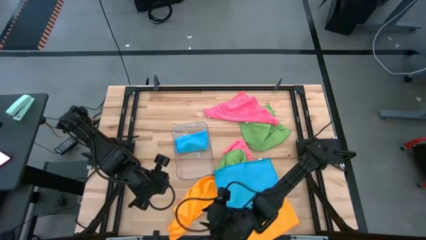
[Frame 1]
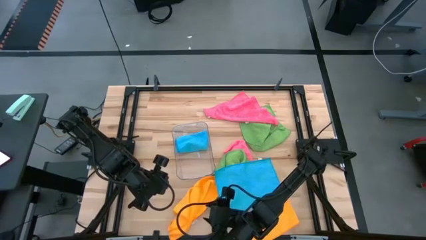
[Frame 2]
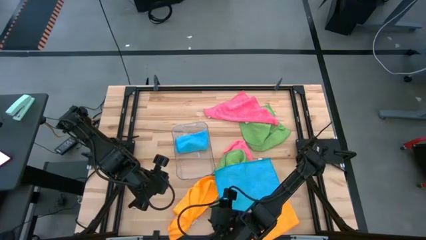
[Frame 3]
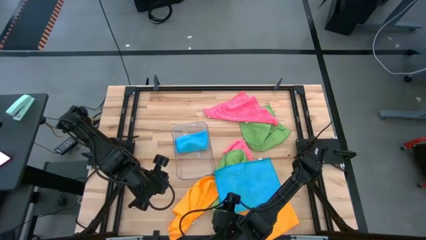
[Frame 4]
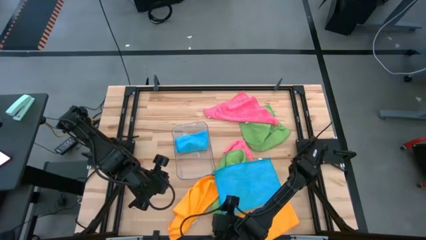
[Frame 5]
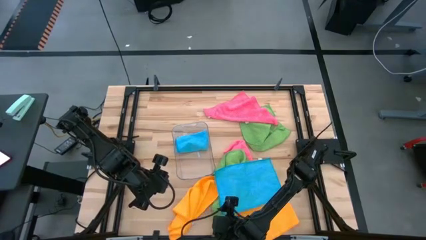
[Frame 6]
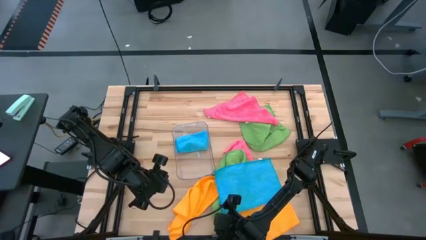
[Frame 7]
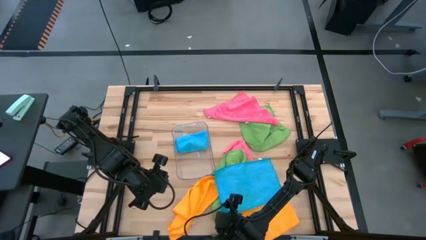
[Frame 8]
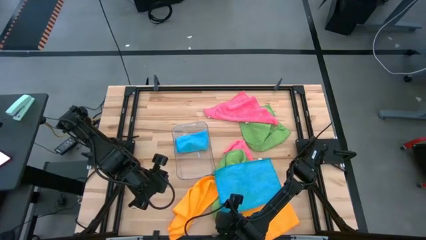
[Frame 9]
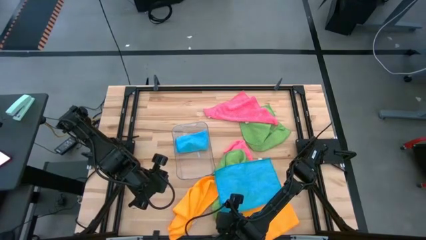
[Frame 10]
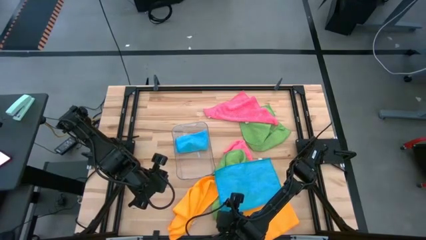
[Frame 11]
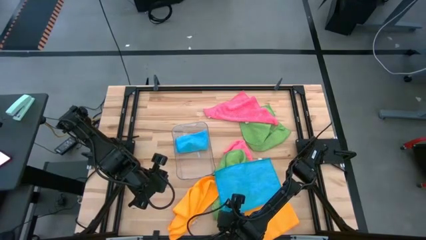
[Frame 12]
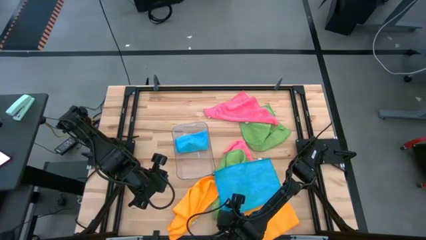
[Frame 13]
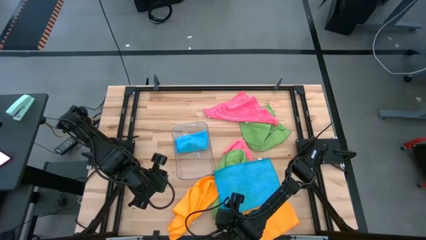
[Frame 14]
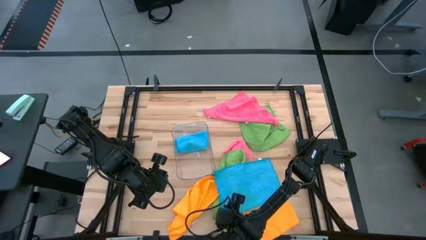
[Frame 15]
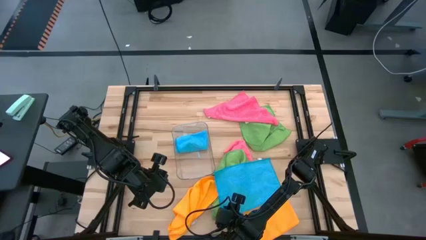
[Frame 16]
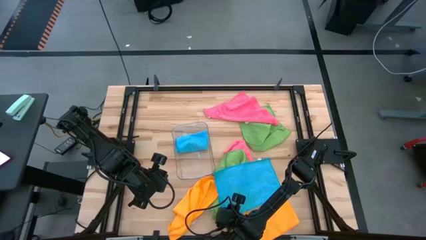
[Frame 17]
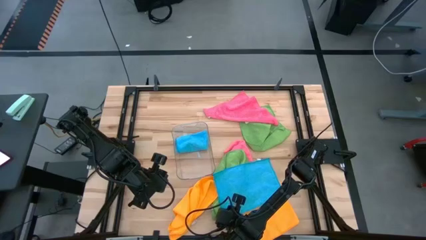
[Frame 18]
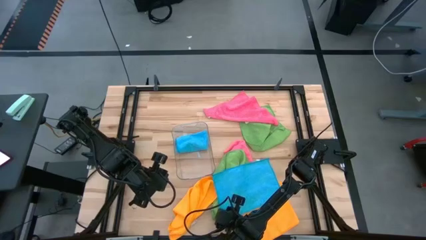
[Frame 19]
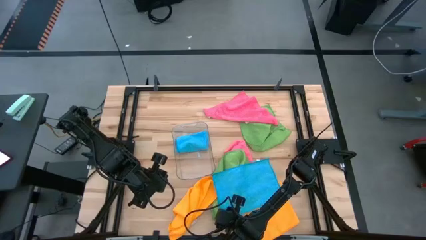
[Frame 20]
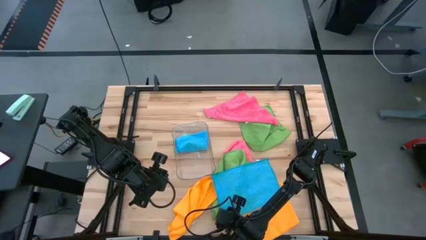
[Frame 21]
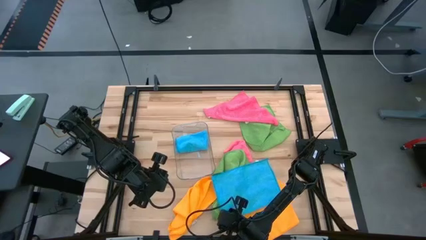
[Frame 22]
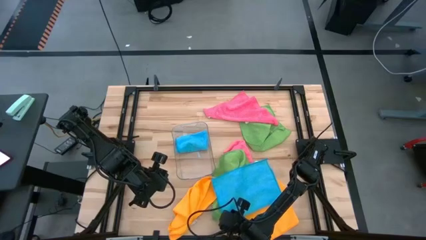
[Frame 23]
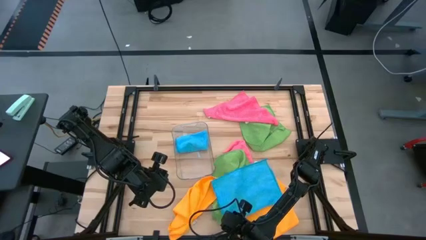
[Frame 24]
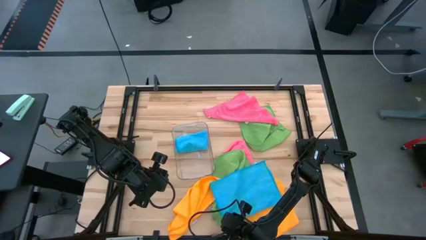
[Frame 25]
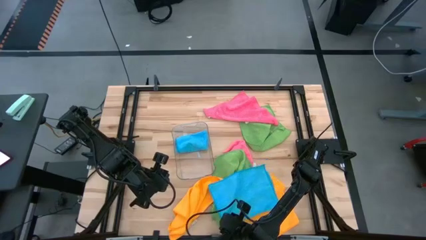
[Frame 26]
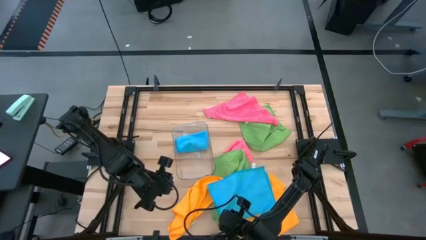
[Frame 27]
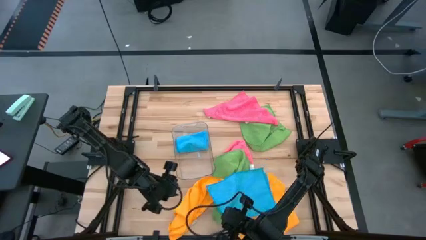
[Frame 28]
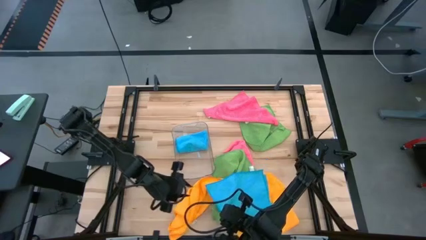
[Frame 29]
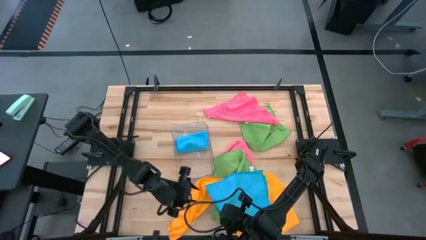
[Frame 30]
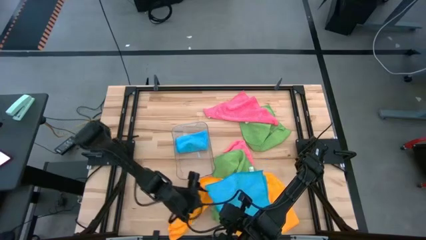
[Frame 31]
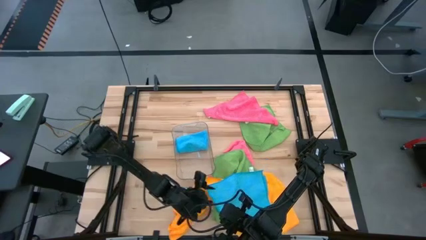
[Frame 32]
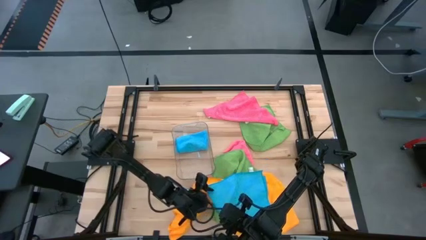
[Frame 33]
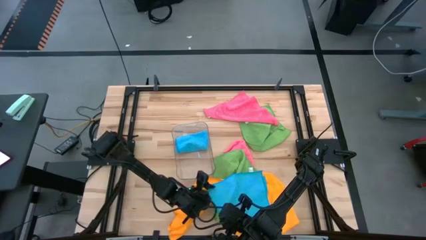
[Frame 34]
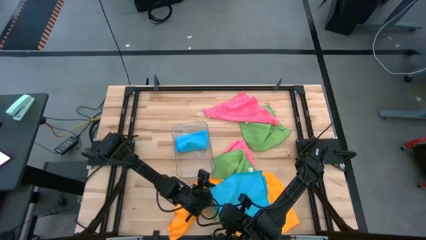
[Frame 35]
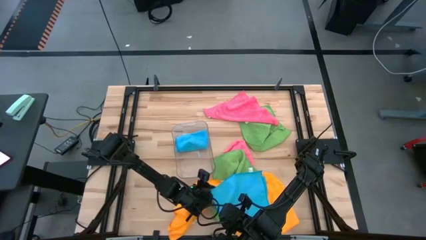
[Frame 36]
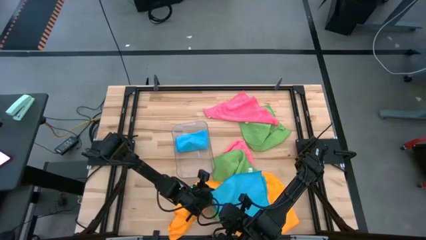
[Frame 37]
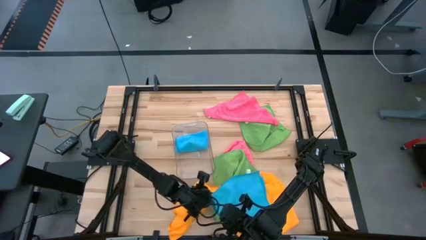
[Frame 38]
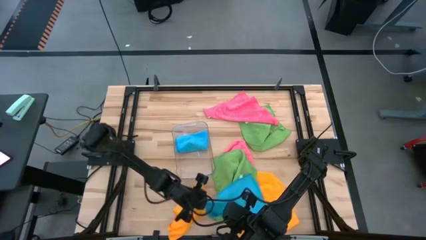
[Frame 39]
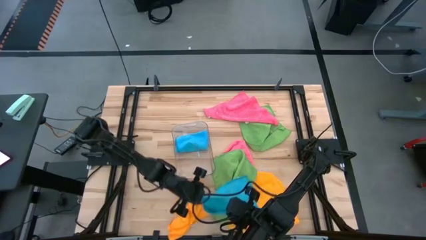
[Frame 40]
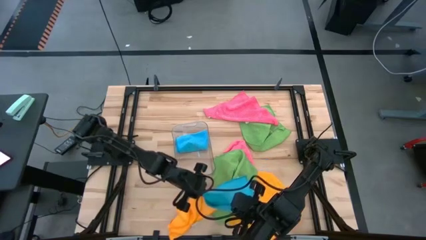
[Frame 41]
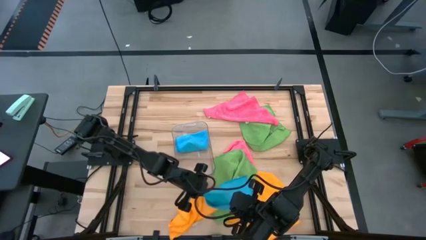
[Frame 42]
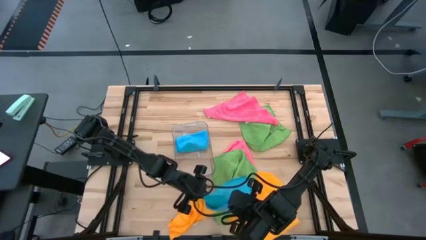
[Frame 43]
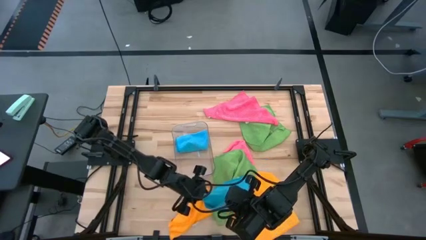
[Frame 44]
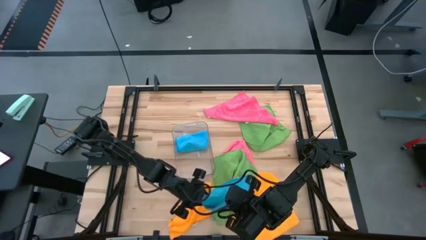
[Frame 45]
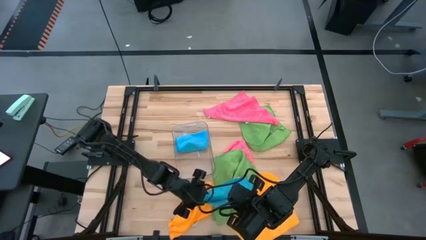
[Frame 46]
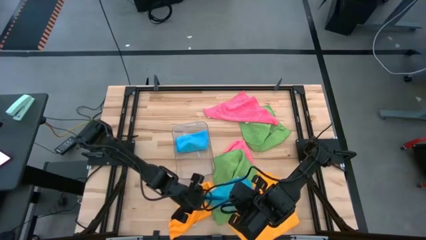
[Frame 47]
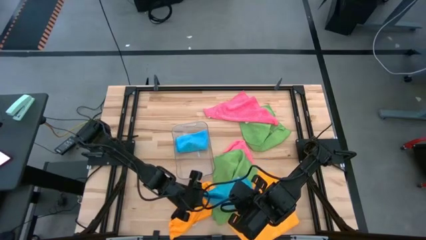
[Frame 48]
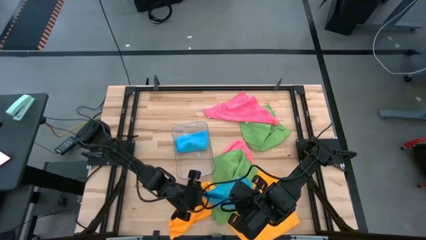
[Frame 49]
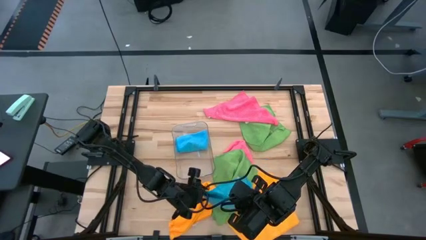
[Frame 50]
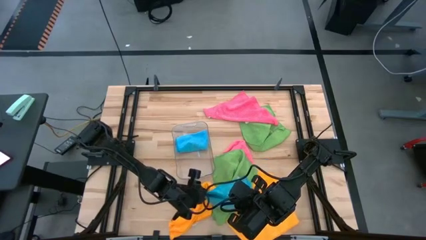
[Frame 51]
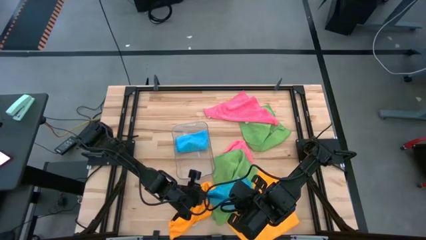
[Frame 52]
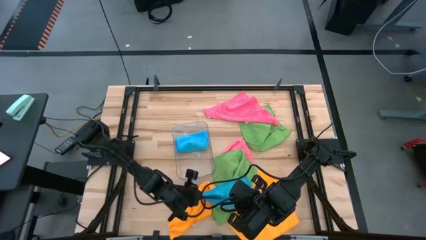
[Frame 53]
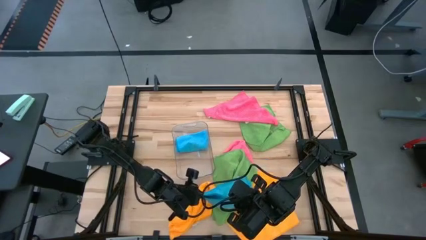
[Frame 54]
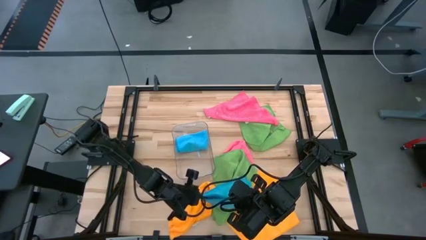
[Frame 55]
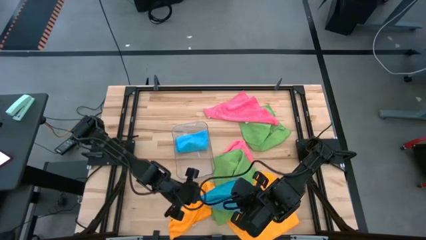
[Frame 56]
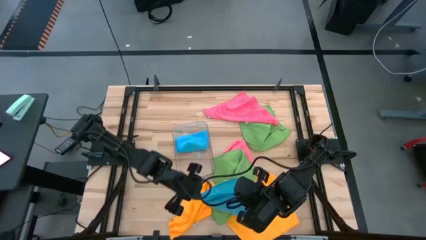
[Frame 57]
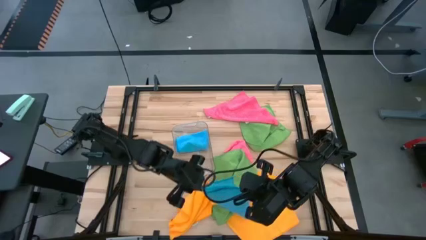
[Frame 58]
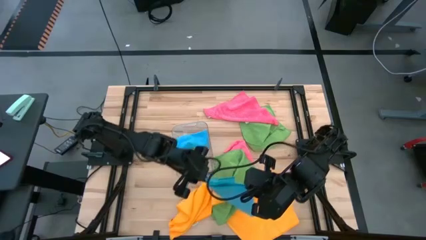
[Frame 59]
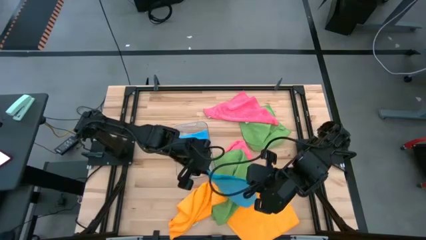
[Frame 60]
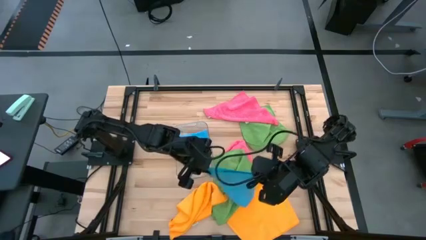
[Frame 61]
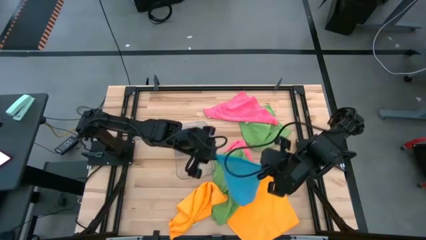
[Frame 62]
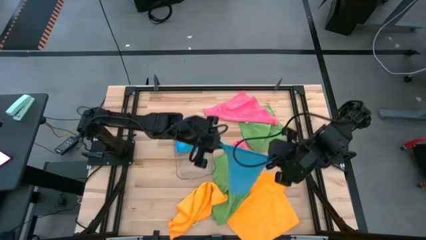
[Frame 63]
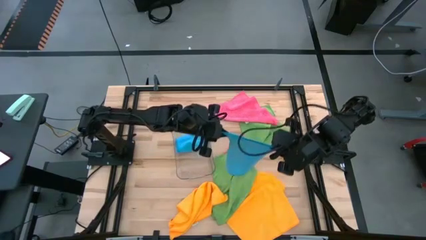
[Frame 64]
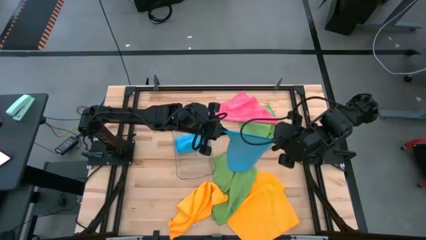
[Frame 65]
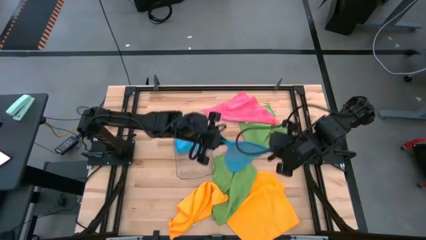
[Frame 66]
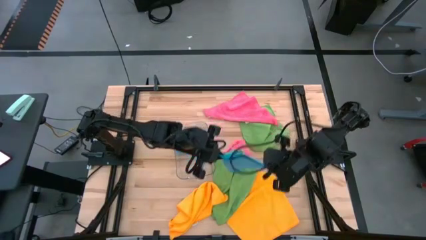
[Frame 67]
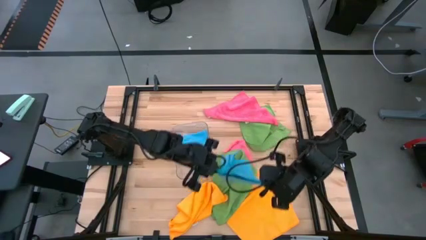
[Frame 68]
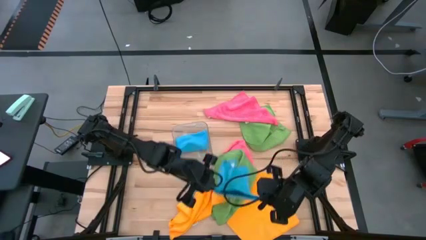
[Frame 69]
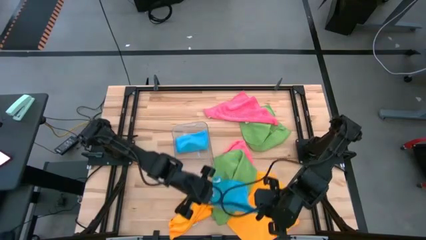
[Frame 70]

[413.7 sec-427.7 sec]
Task: Fold microfiber towels
Fold the blue towel
